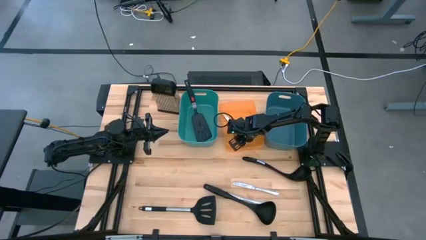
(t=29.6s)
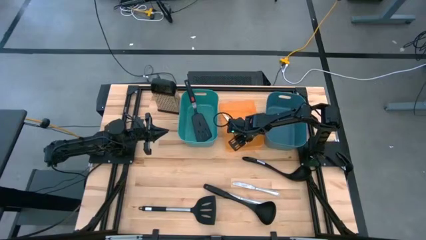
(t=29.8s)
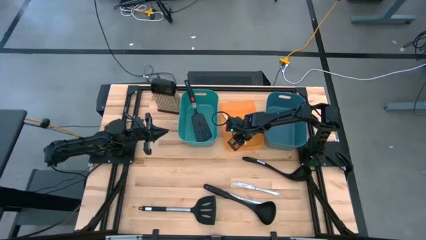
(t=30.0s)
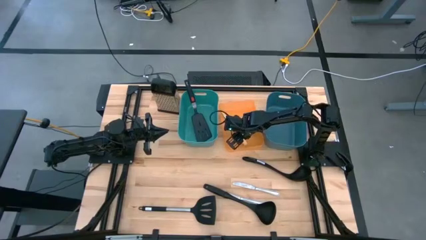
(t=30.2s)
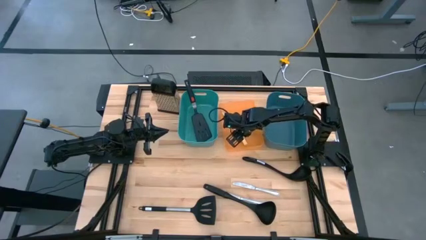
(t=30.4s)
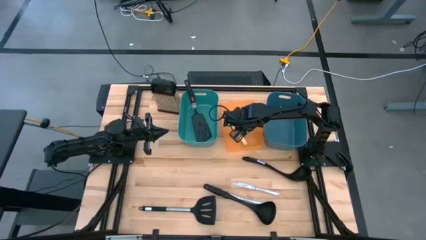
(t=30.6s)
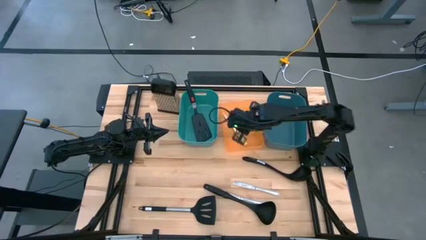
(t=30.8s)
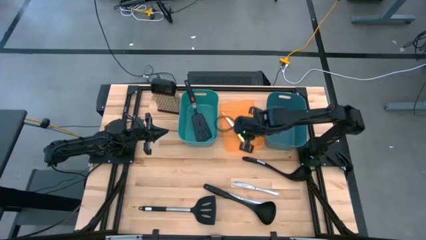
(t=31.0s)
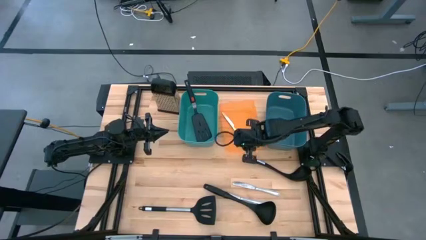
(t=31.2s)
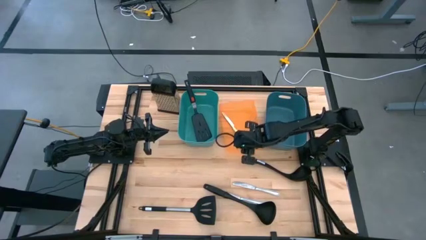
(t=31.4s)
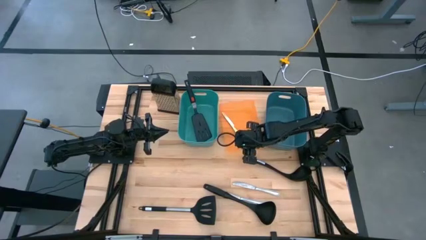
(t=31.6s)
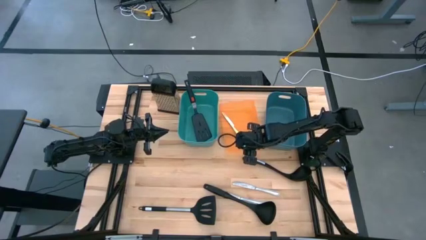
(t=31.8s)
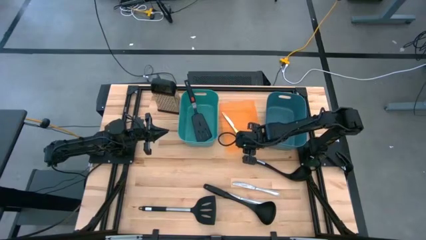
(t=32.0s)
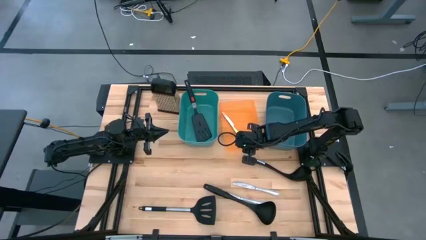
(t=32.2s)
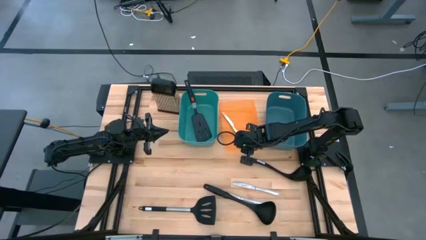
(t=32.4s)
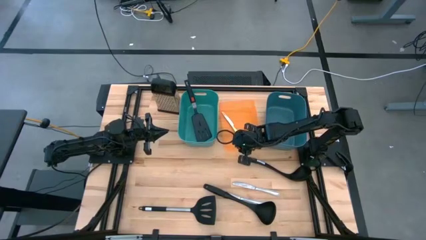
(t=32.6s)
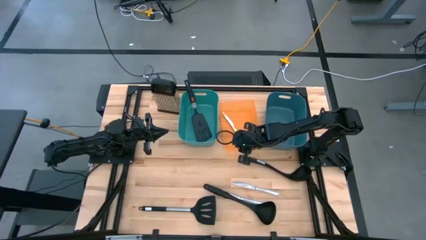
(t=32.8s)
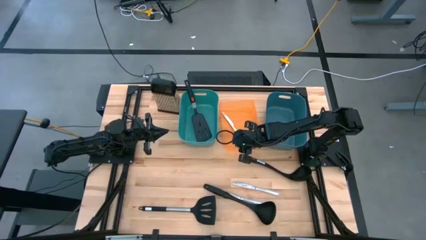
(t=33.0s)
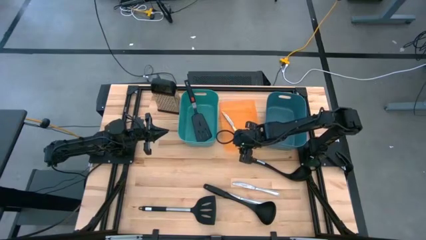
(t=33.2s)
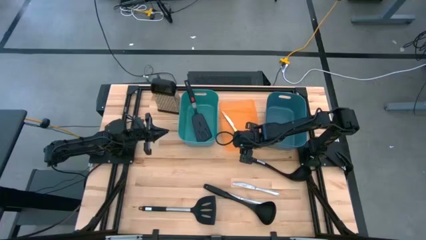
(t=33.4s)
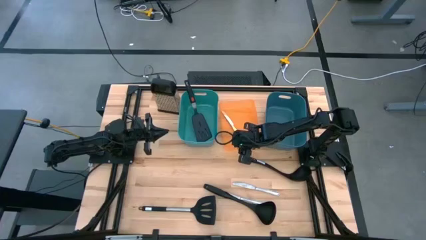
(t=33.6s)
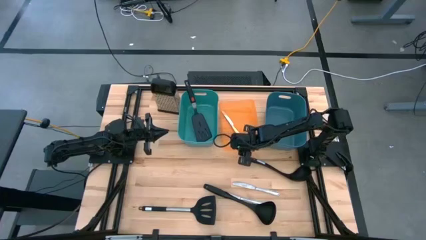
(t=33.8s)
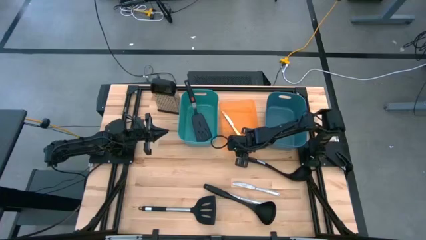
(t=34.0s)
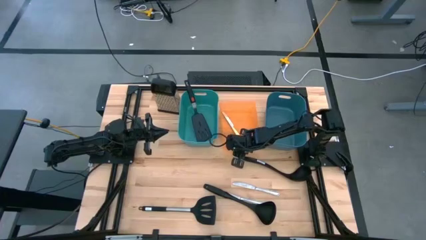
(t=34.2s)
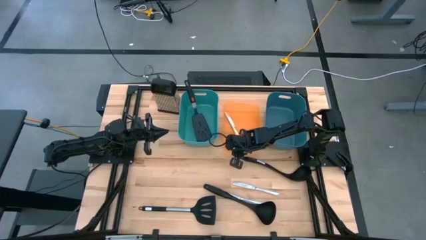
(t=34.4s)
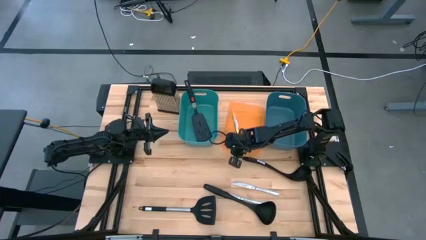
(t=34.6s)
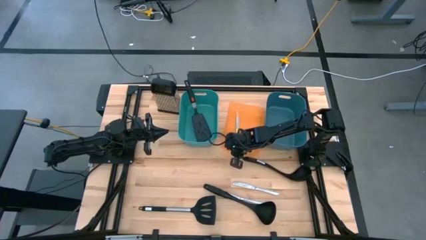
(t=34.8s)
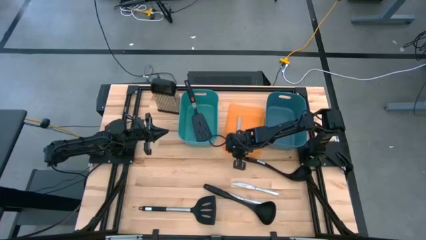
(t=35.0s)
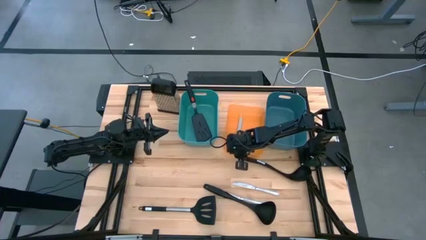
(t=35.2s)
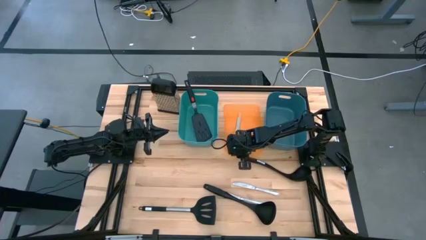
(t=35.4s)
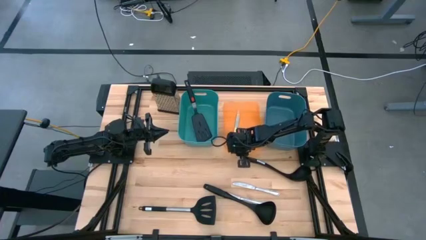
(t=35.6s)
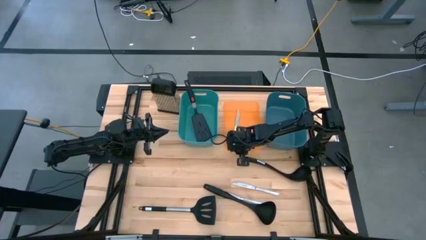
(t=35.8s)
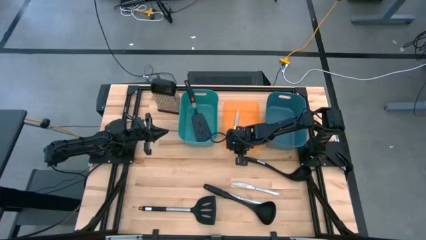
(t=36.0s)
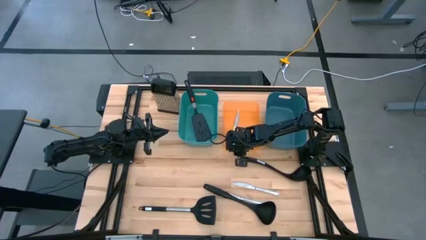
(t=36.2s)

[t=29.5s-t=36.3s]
Task: Pick & Place Kitchen Items
Adjust the orange bin

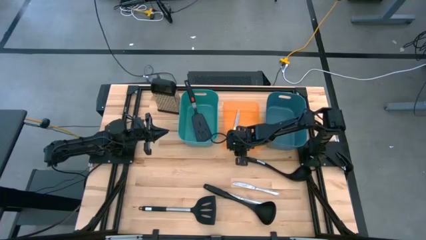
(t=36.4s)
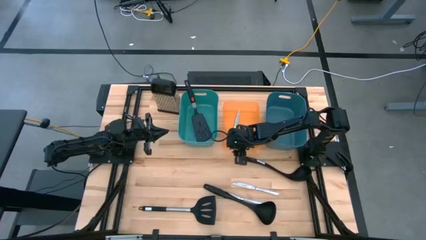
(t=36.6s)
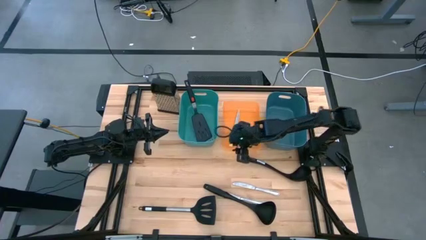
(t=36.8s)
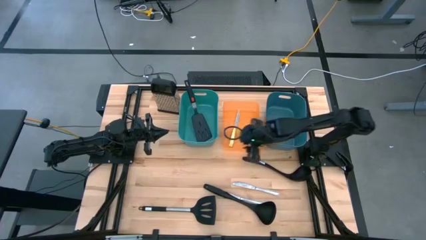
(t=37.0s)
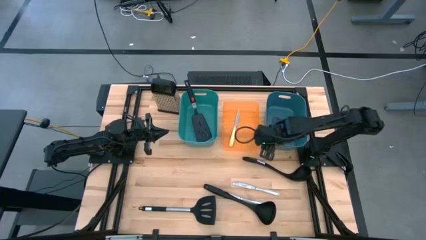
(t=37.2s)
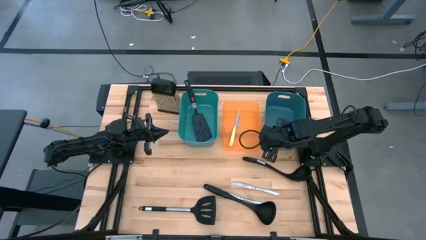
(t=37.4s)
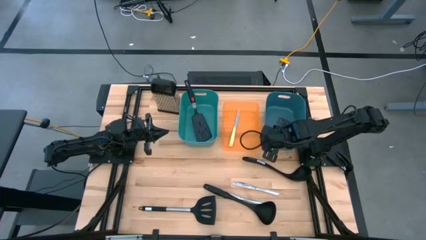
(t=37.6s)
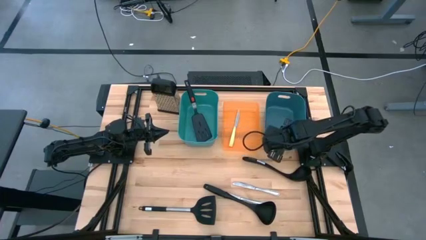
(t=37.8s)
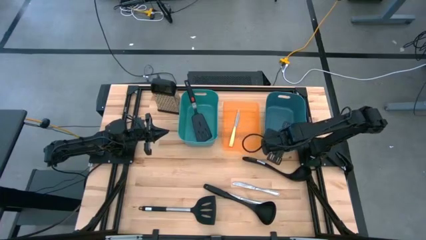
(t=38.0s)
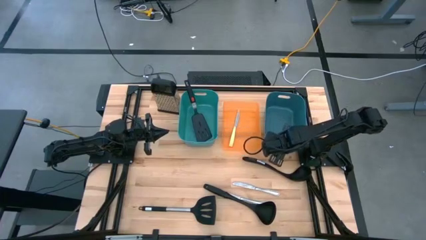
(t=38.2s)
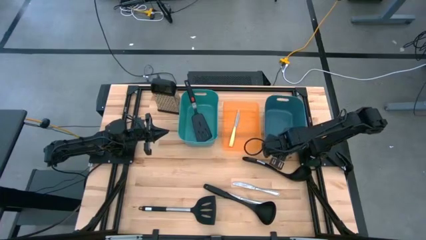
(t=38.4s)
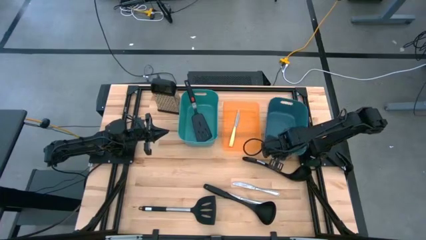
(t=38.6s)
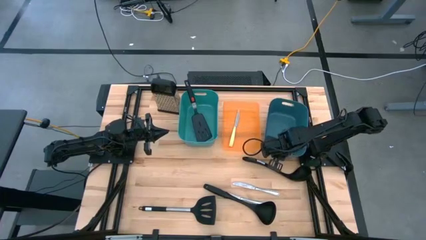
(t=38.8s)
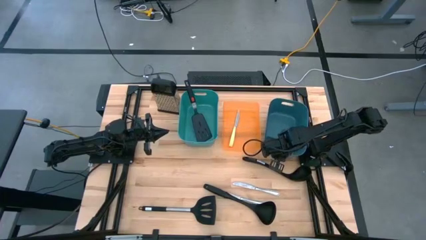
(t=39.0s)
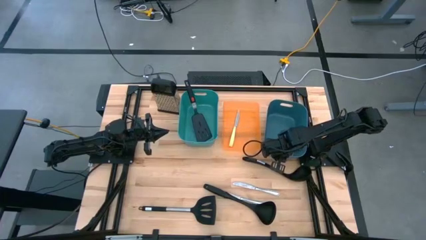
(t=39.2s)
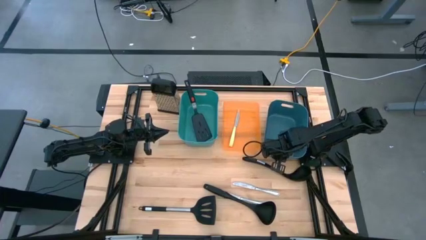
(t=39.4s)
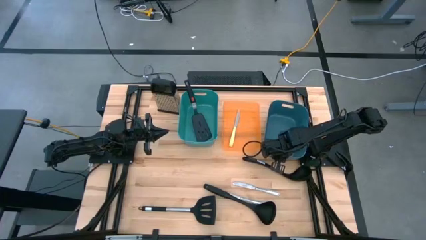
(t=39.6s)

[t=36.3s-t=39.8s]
Adjust the blue bin

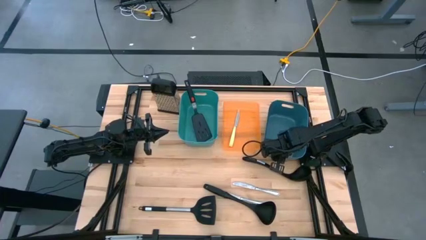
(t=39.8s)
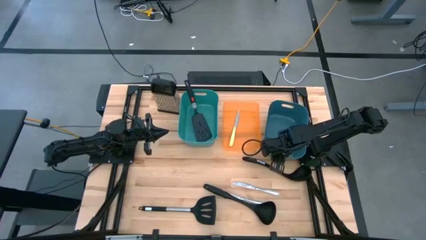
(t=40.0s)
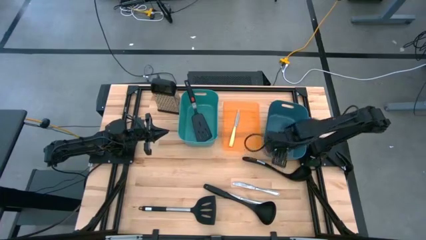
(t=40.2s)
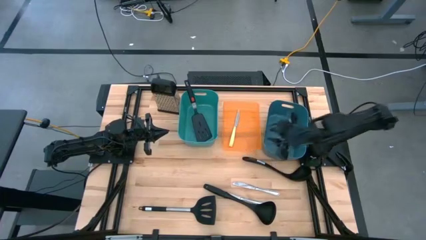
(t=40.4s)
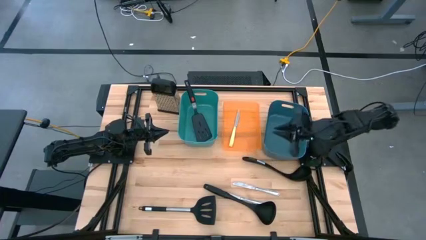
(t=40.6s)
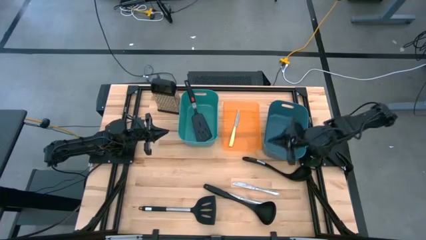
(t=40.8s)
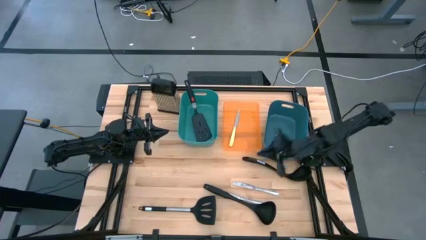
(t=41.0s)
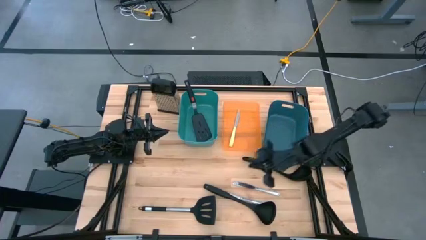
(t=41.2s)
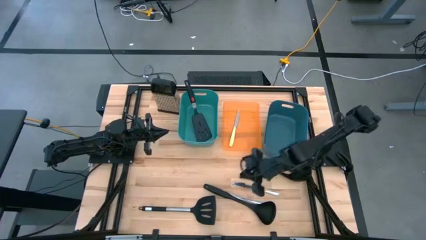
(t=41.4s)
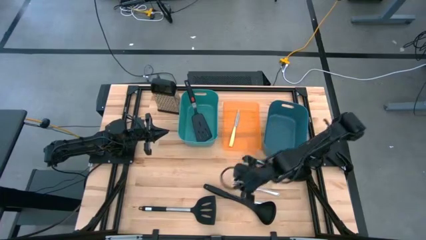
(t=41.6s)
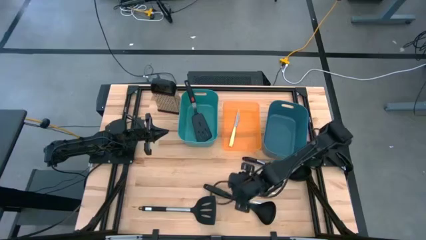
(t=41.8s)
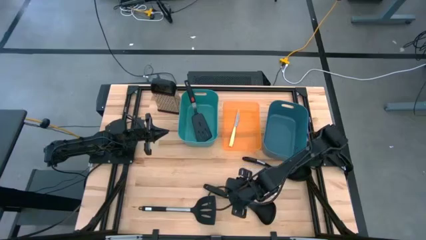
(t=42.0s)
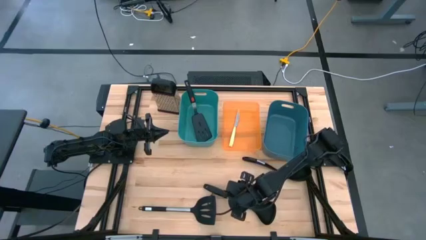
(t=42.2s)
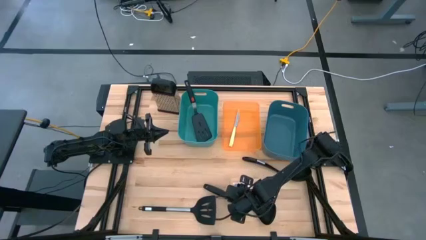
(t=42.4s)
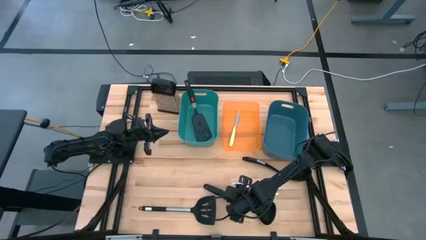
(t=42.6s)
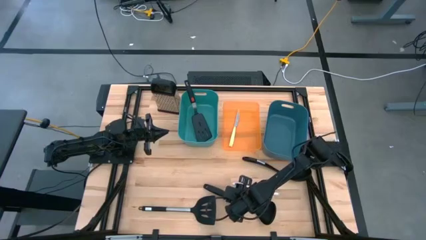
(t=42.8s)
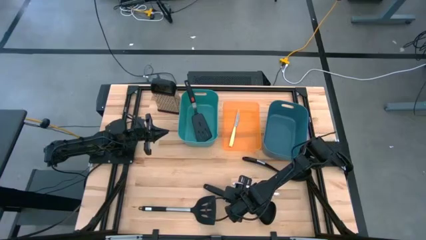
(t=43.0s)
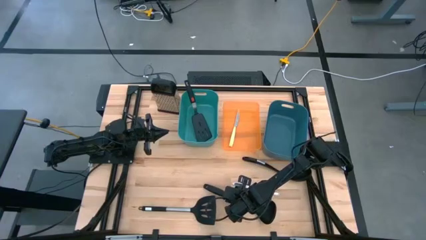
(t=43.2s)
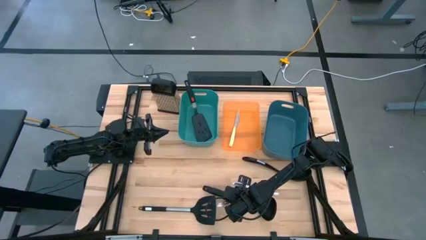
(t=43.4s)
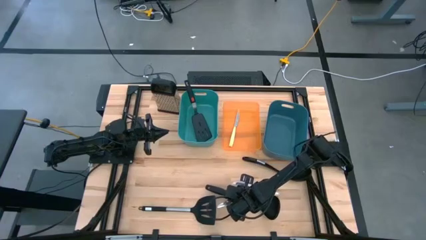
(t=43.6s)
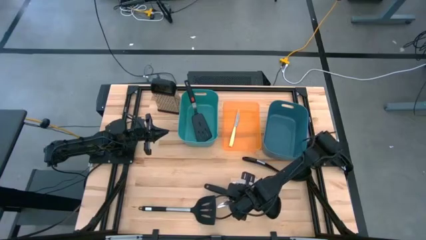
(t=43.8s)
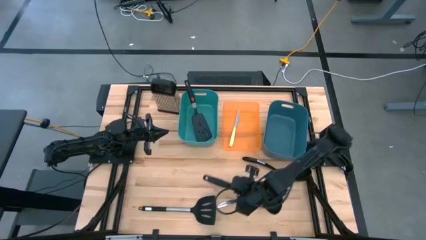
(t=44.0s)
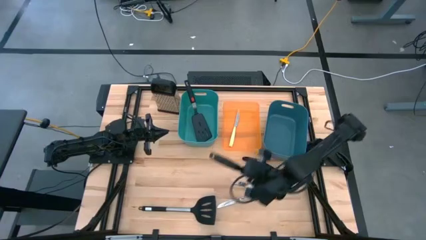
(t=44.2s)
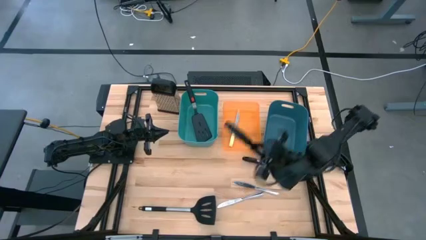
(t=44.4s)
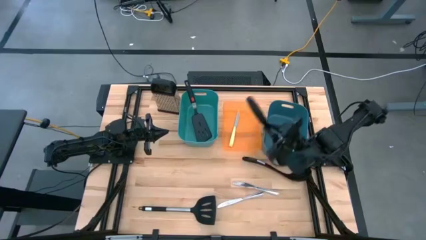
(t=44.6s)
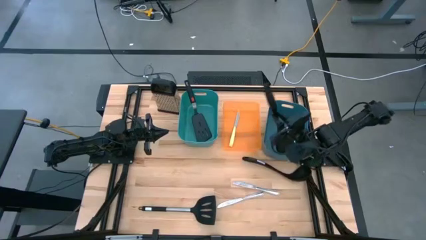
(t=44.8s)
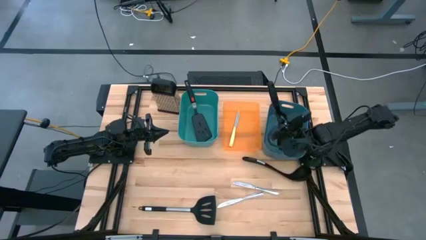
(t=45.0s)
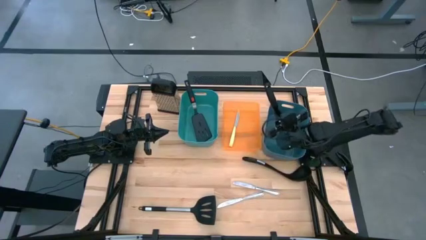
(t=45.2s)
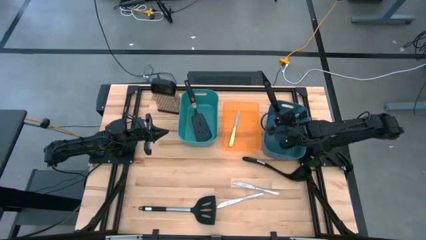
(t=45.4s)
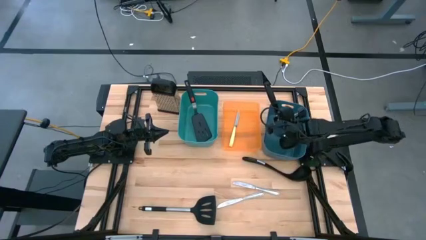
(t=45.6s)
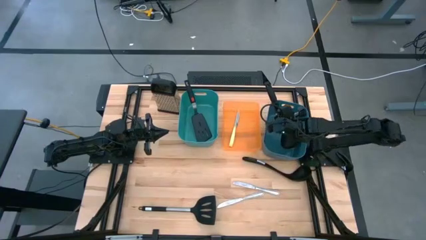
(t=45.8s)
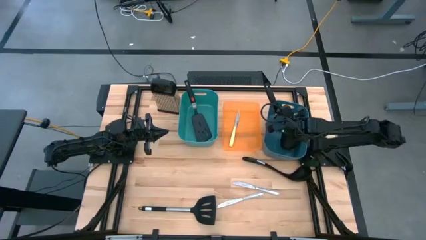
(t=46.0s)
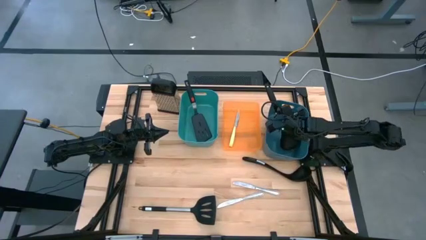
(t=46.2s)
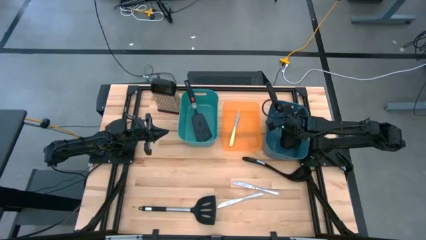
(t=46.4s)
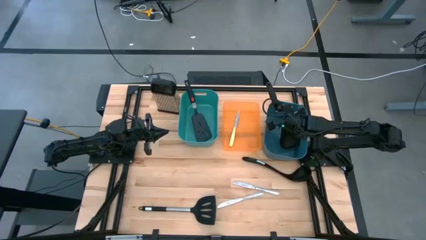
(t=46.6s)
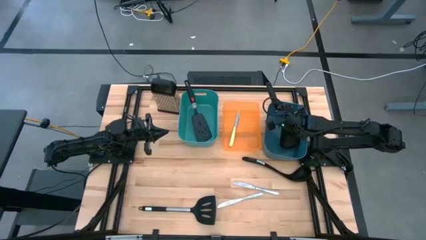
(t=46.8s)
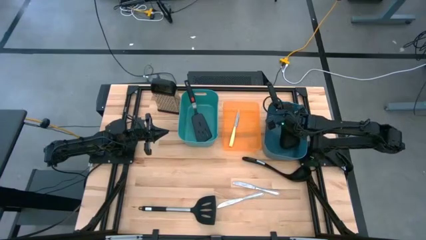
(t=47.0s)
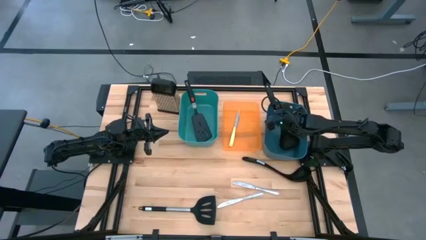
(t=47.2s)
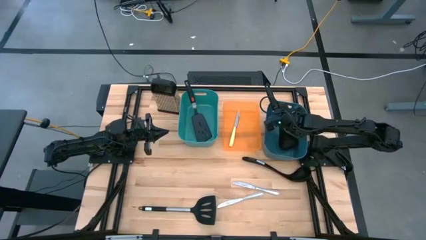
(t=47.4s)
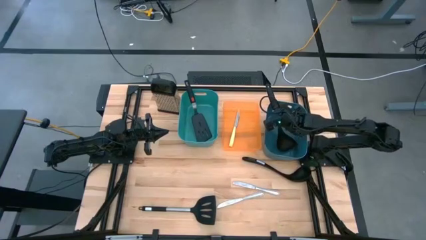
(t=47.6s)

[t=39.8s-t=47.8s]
Put the bottom black serving spoon into the blue bin
